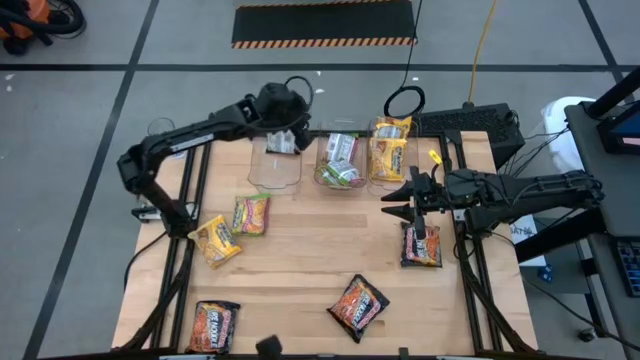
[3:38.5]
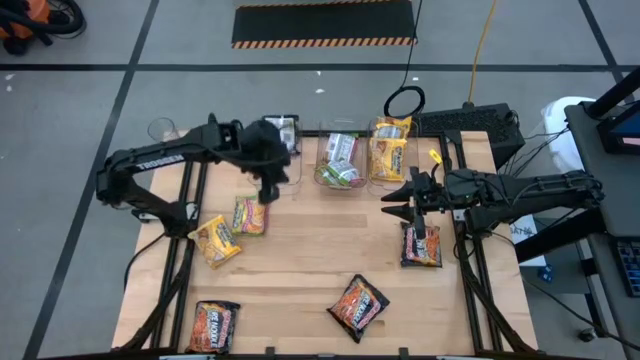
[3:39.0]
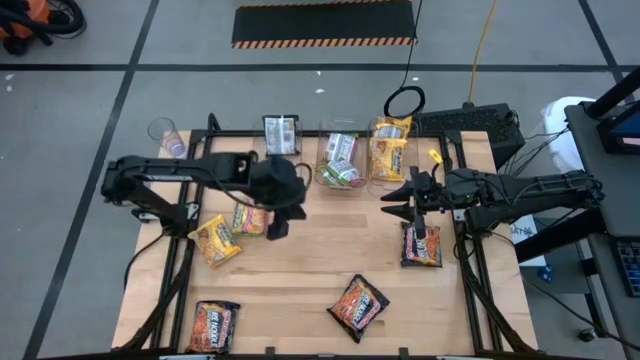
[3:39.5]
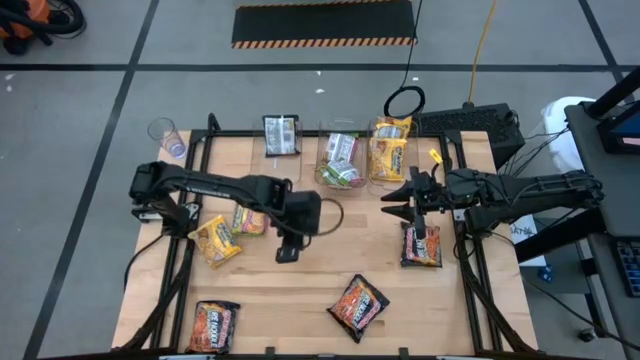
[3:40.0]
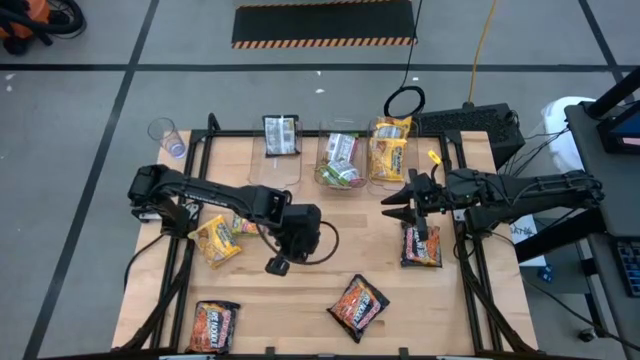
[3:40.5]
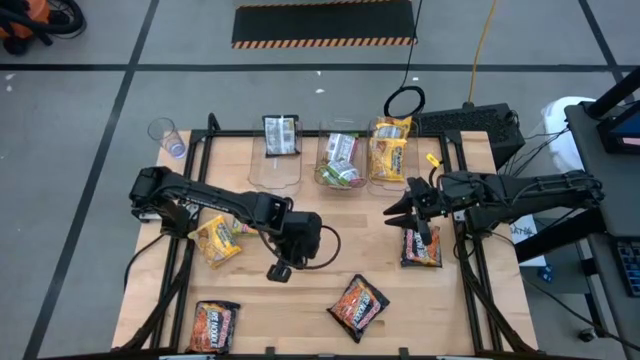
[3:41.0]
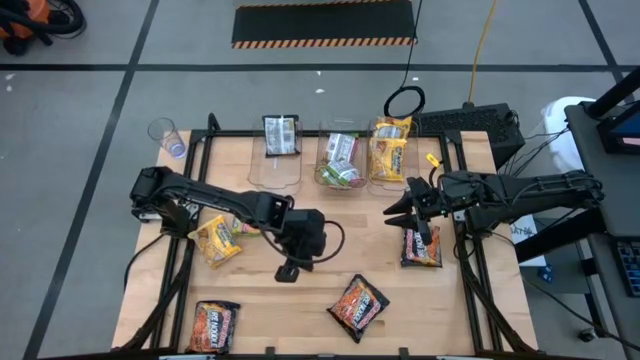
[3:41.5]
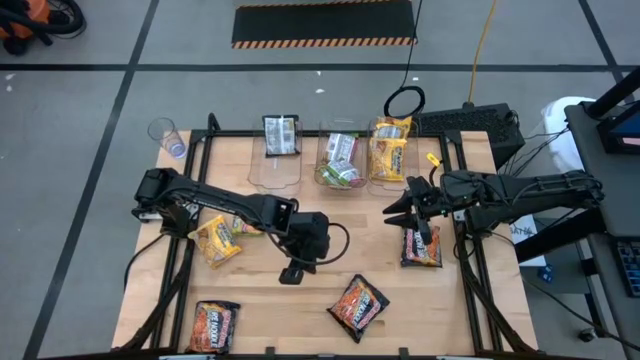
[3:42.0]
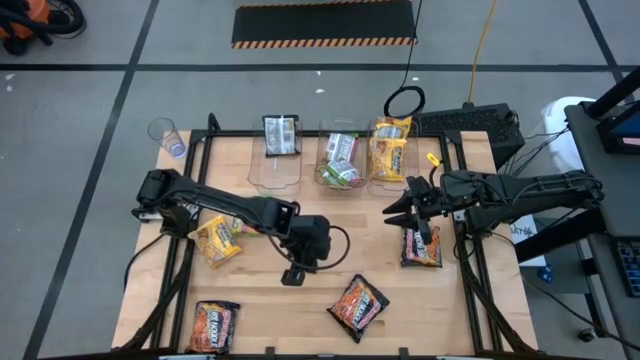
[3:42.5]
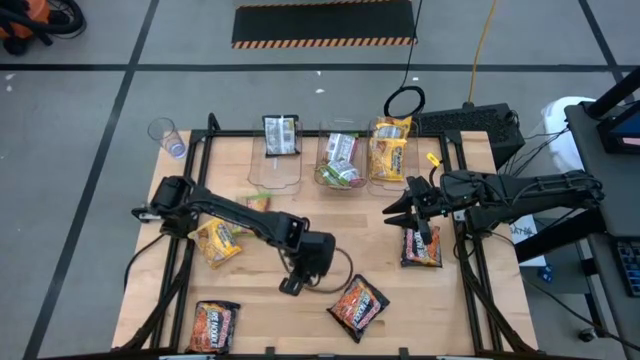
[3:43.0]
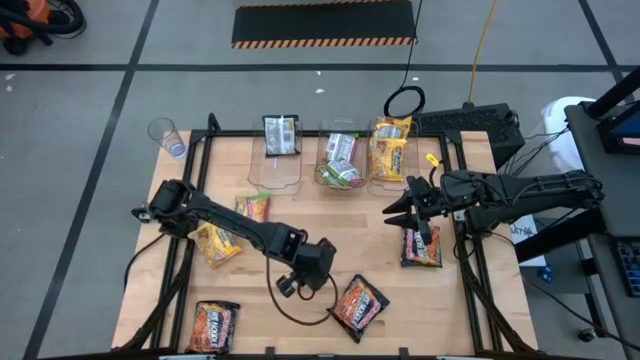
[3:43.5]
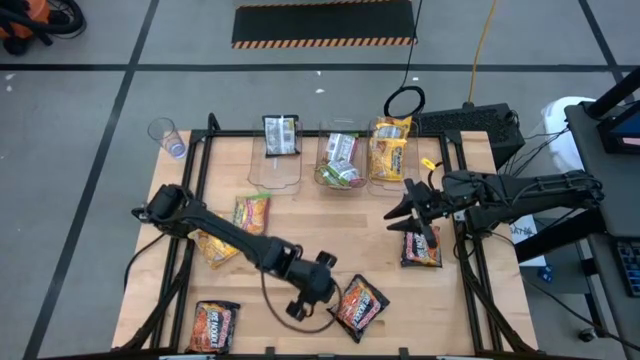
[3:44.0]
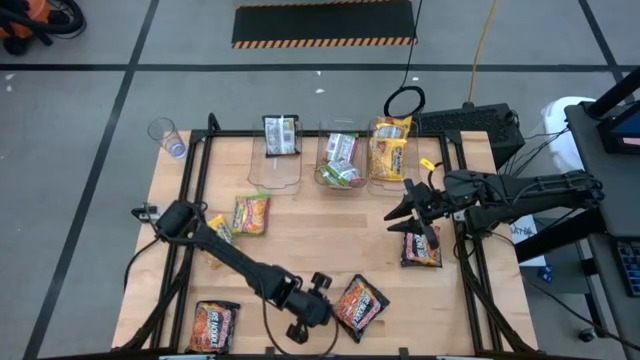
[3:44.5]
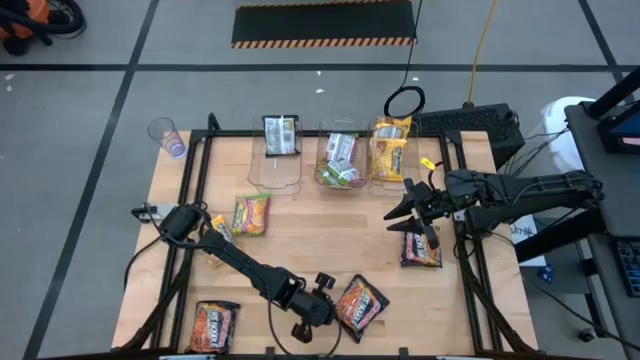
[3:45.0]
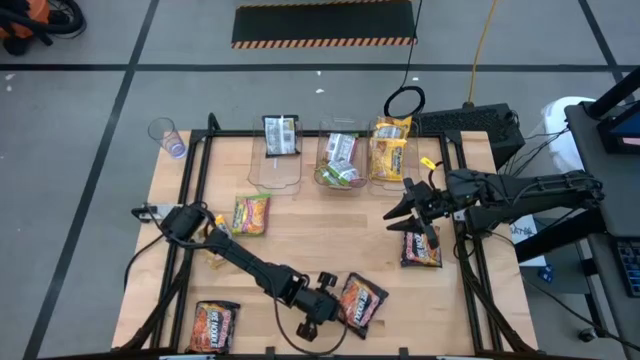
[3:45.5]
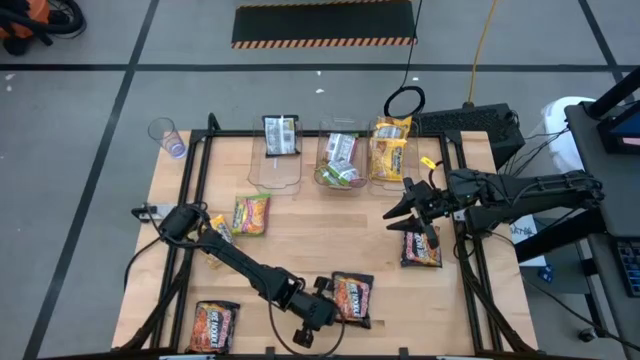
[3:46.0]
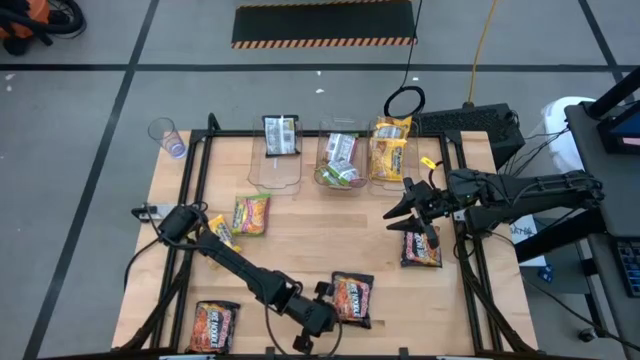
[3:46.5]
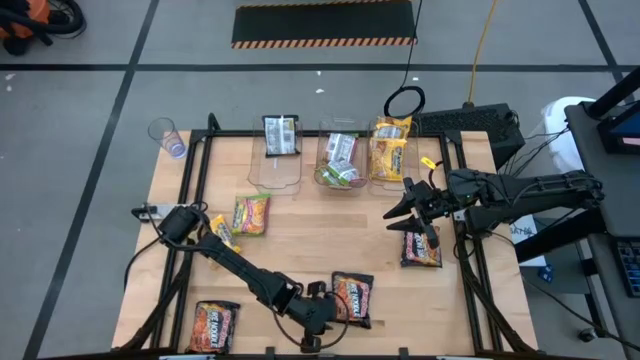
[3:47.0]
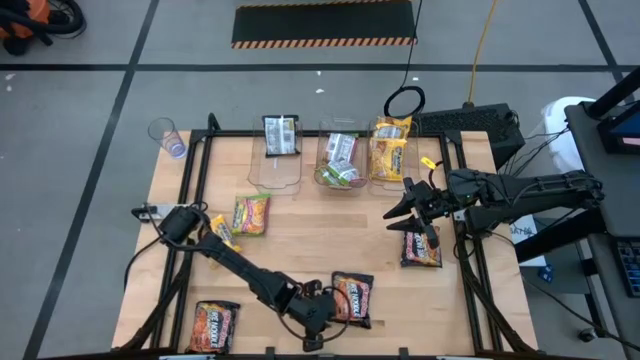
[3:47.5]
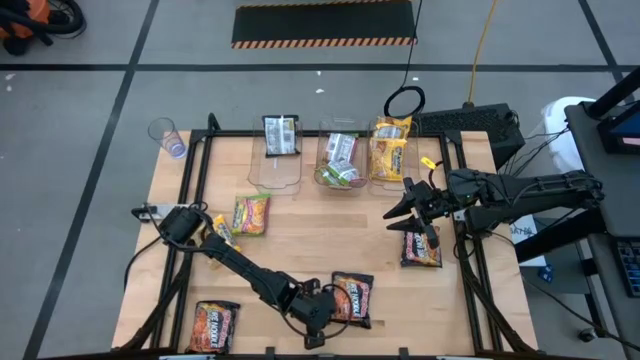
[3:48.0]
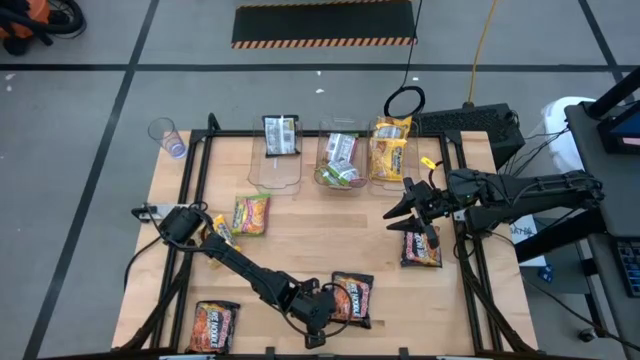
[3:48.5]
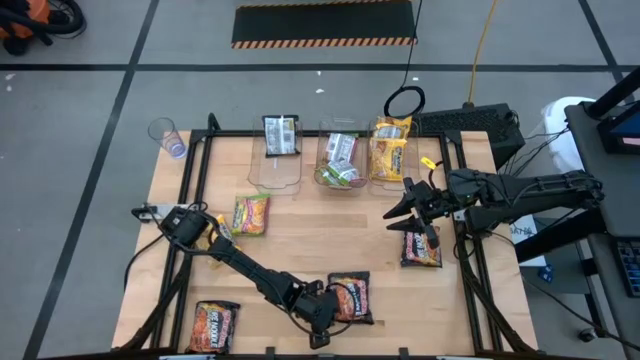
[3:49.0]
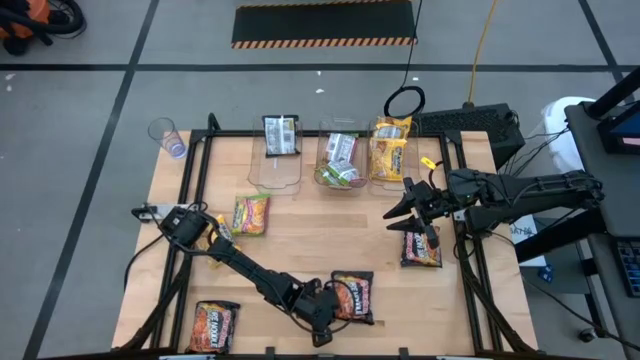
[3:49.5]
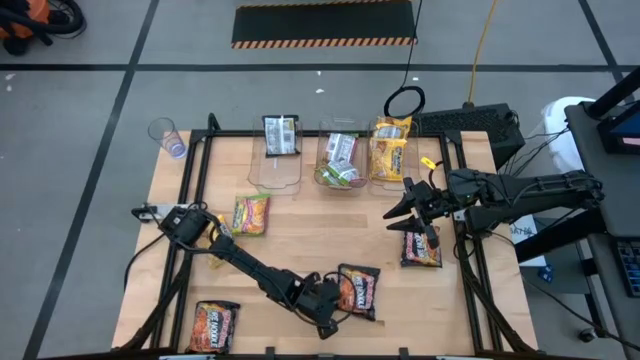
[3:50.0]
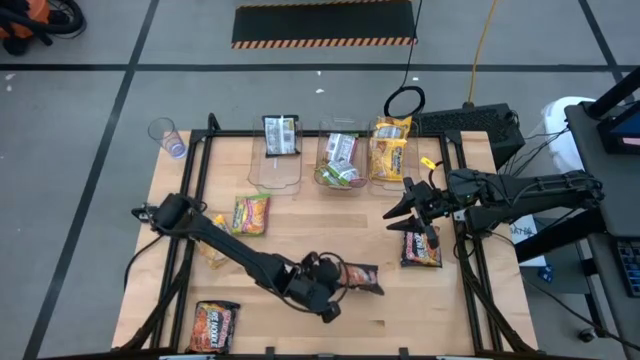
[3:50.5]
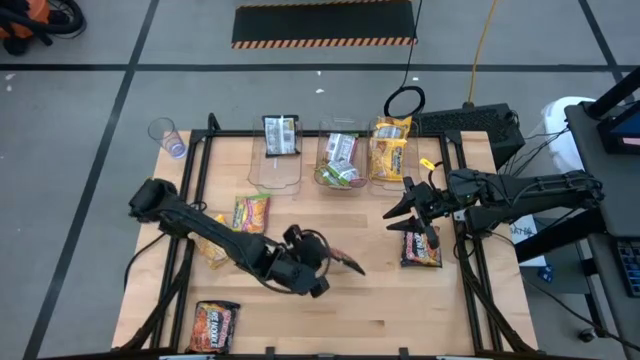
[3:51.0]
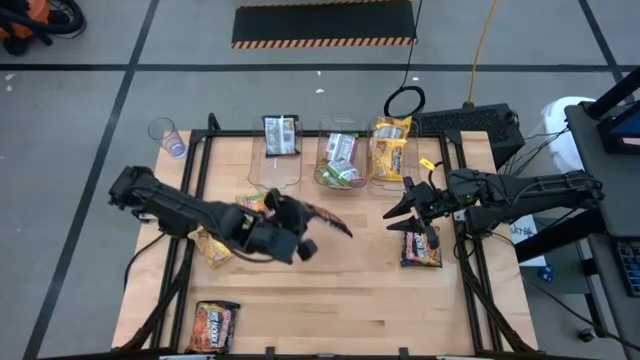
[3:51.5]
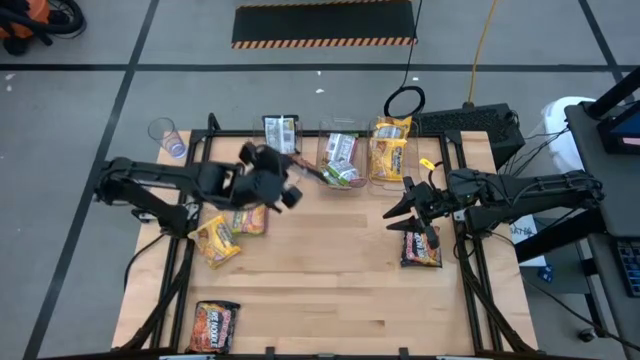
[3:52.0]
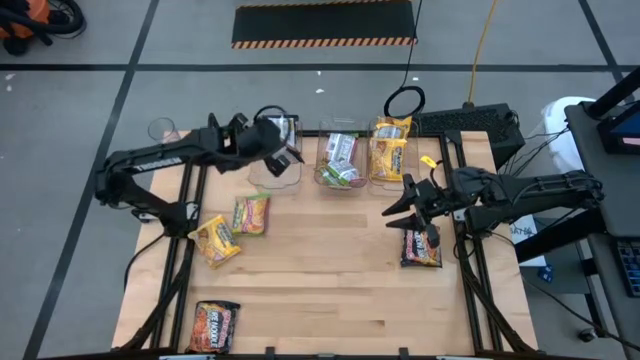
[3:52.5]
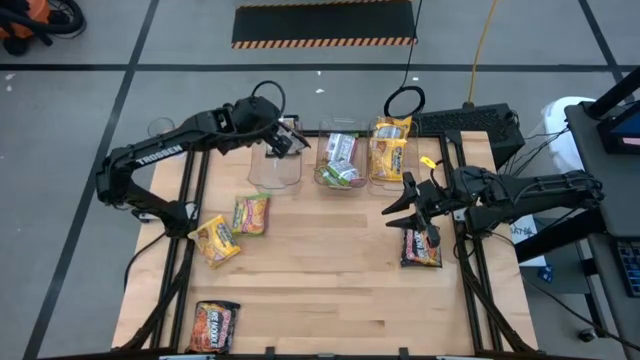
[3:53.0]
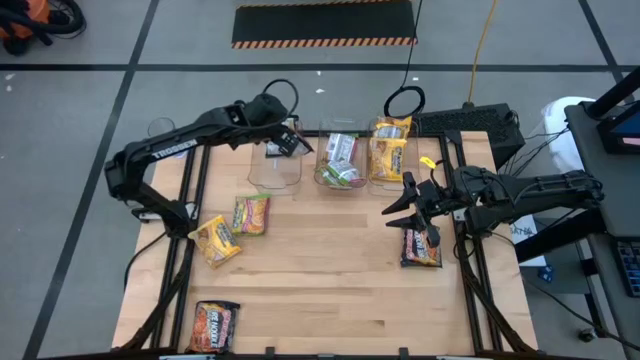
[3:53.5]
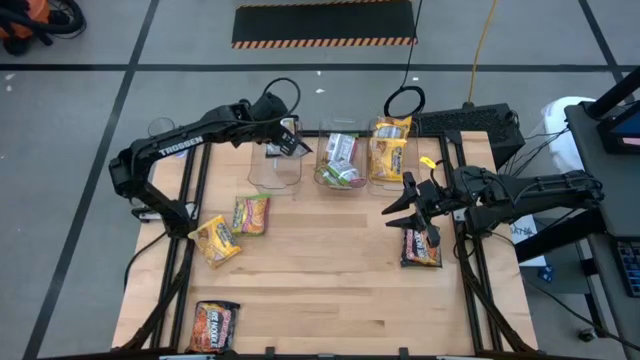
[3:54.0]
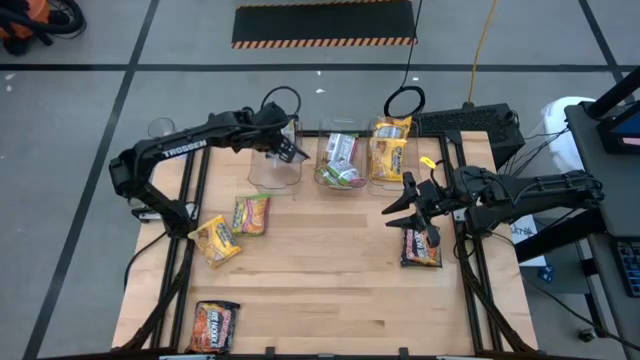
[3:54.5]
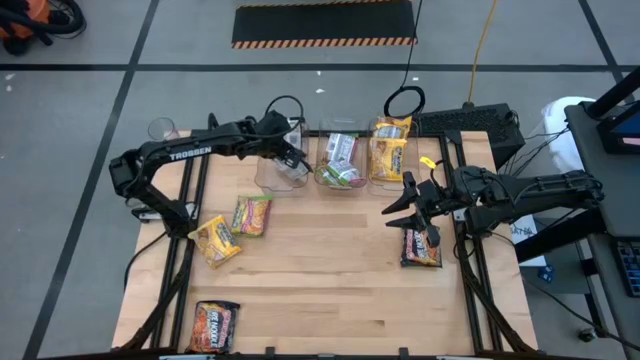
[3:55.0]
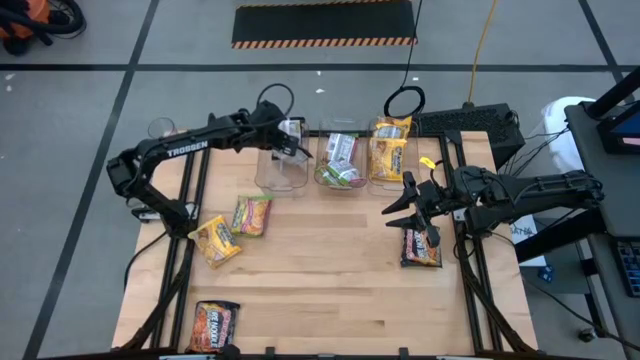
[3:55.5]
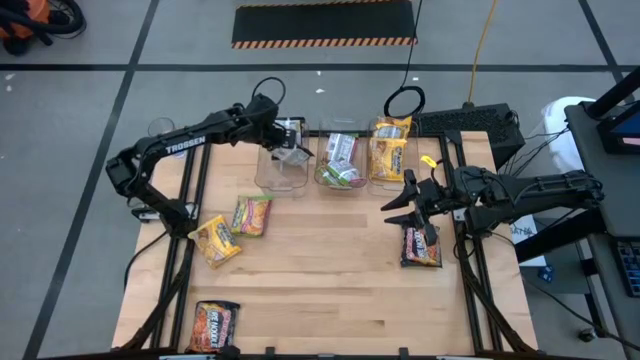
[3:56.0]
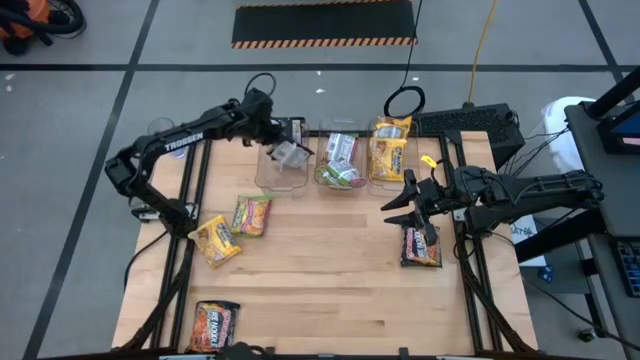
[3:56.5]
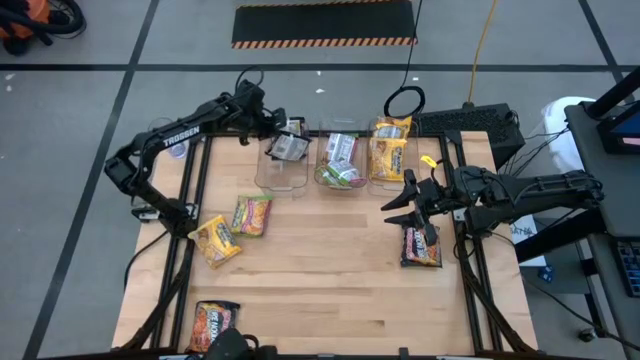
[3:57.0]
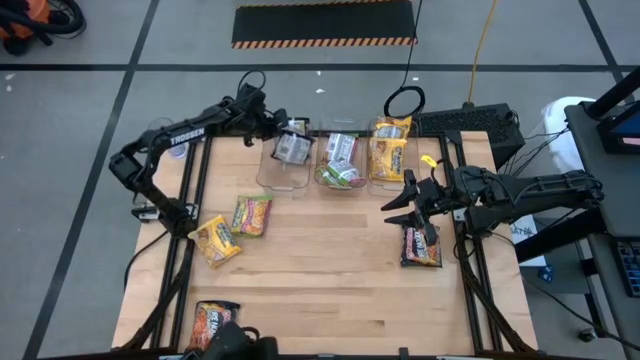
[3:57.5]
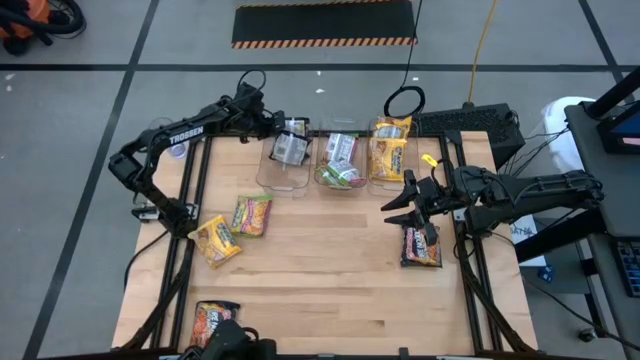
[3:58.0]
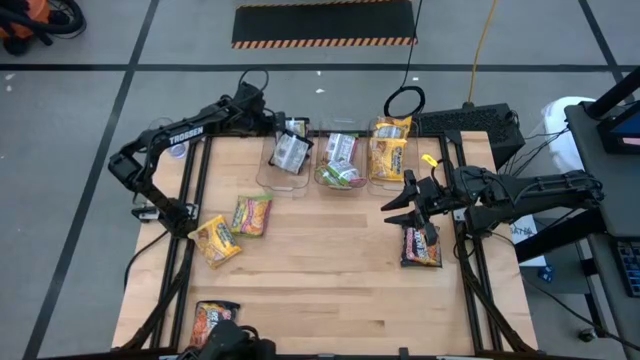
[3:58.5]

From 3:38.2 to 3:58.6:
Task: Sort Maruchan noodles
Put the black noodle pack into the left transparent bin

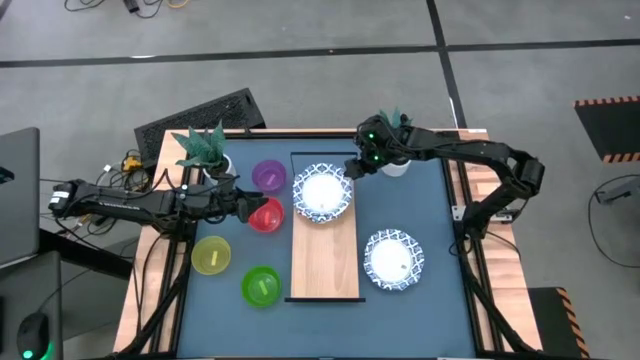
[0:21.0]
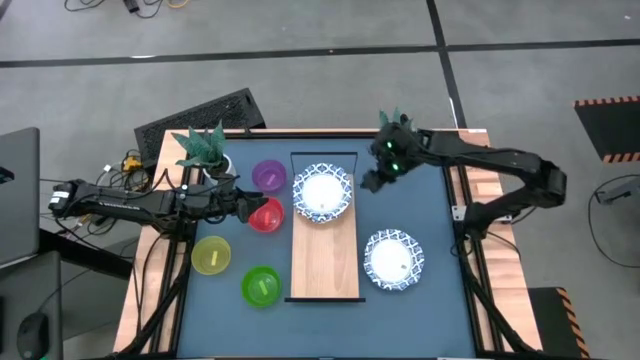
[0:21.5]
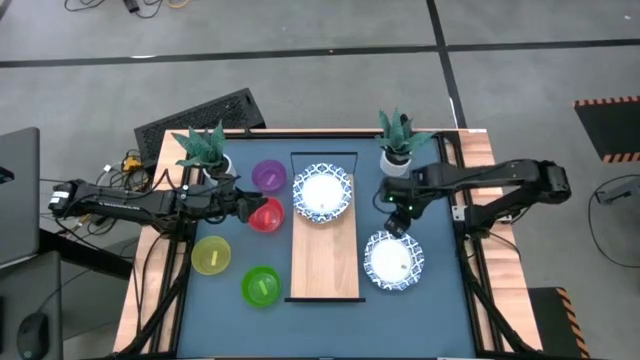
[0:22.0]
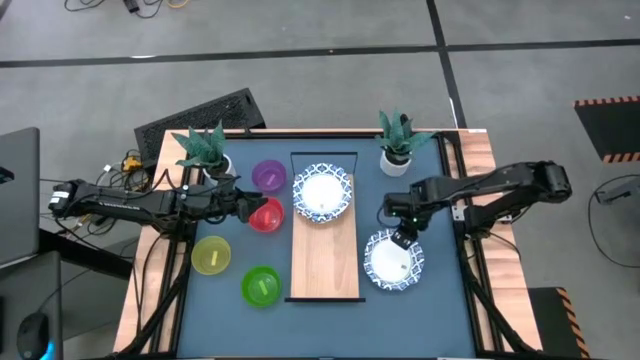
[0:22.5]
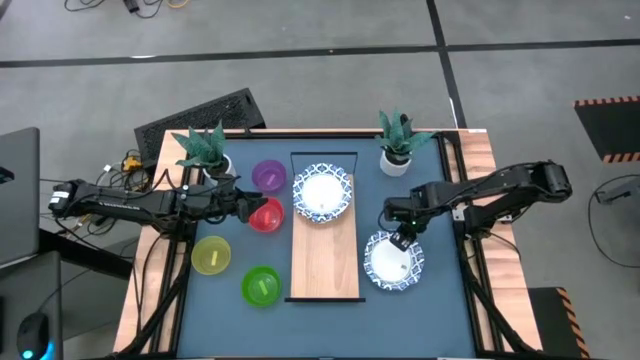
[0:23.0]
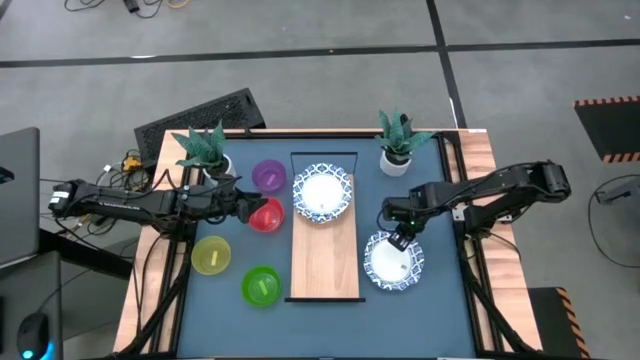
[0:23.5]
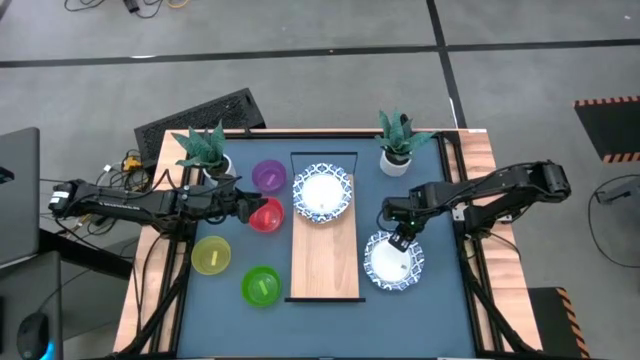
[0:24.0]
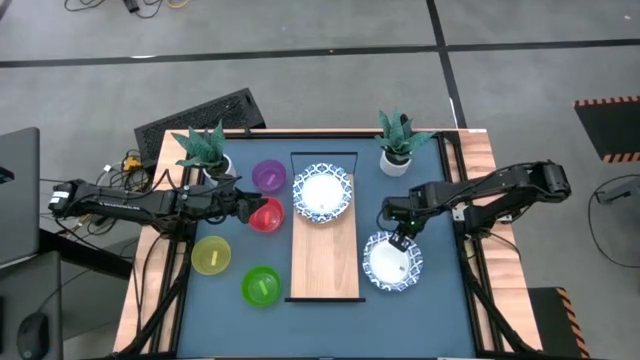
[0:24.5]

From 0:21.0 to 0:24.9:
Task: Place and stack bowls onto a shelf
Stack the white patterned bowl on top of the white patterned bowl on the shelf
